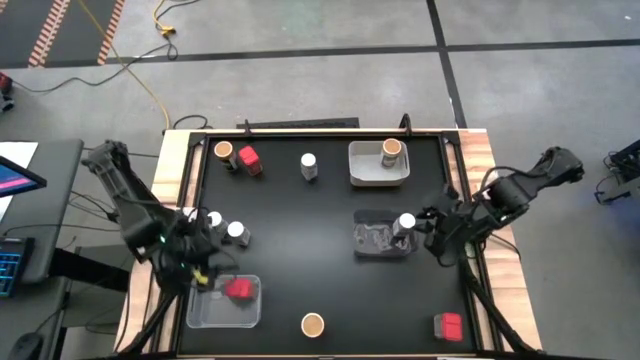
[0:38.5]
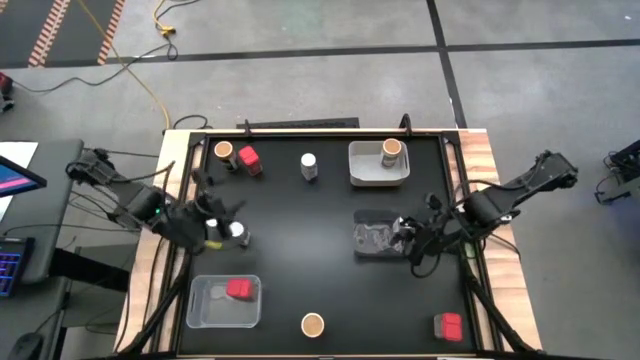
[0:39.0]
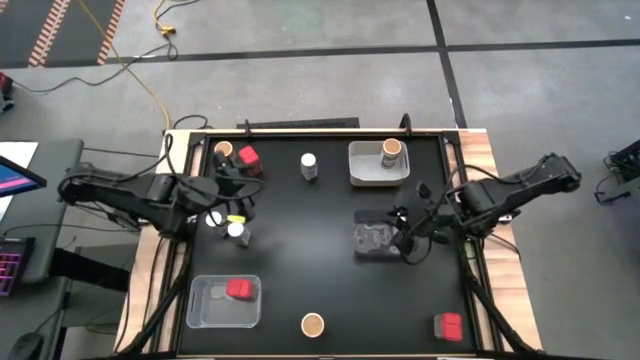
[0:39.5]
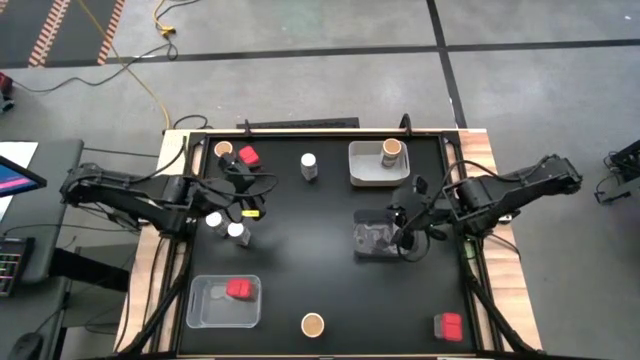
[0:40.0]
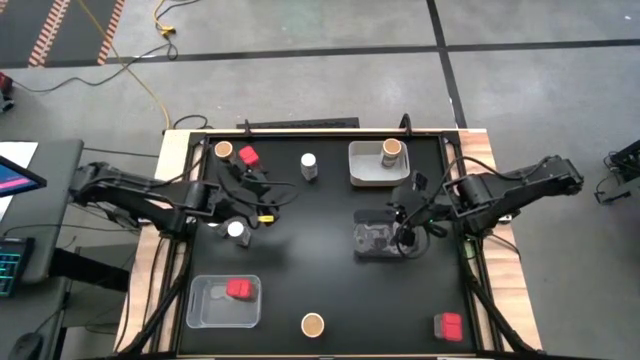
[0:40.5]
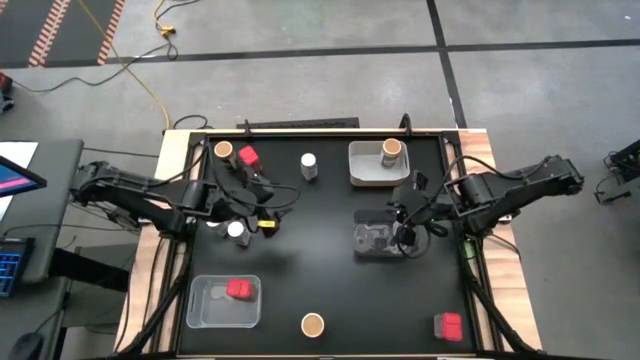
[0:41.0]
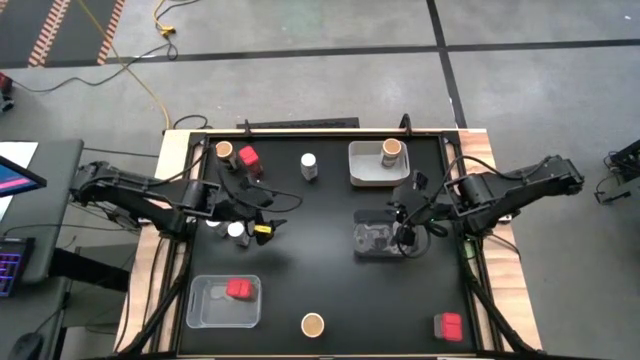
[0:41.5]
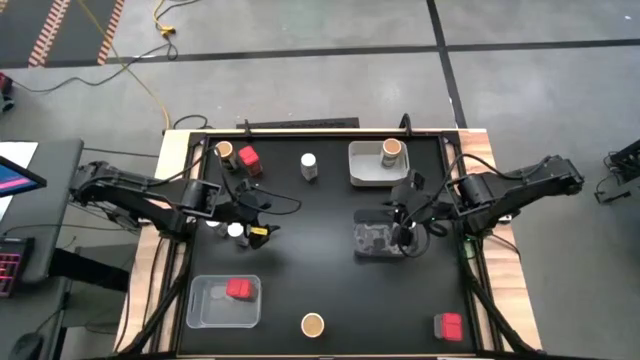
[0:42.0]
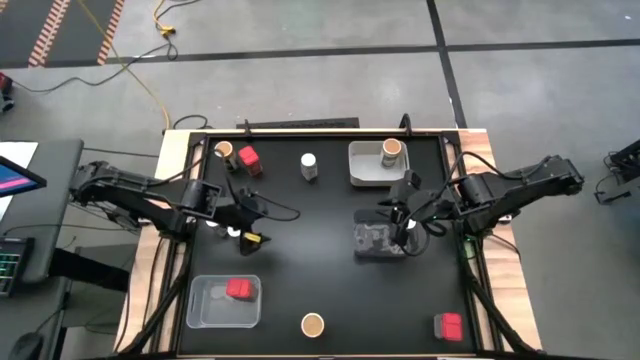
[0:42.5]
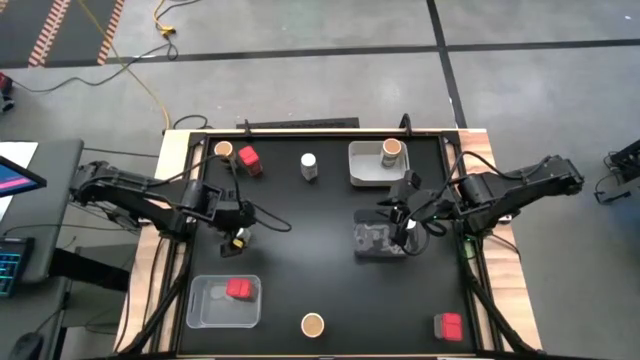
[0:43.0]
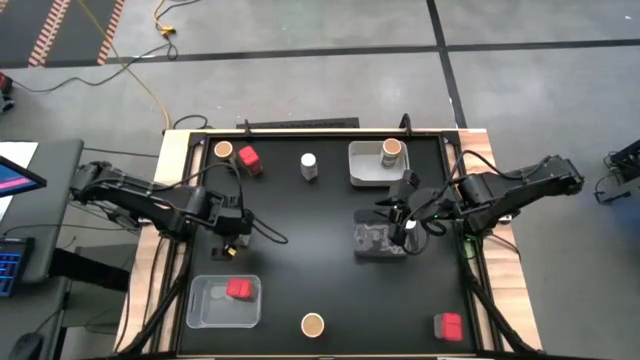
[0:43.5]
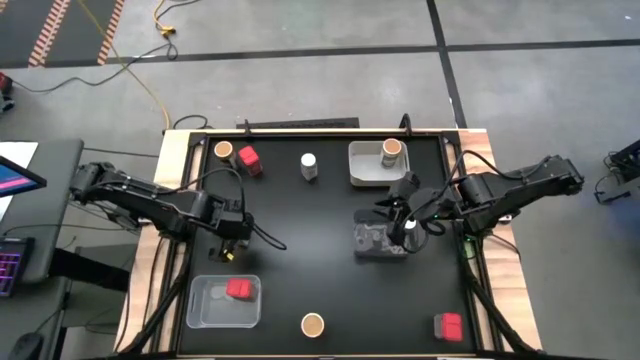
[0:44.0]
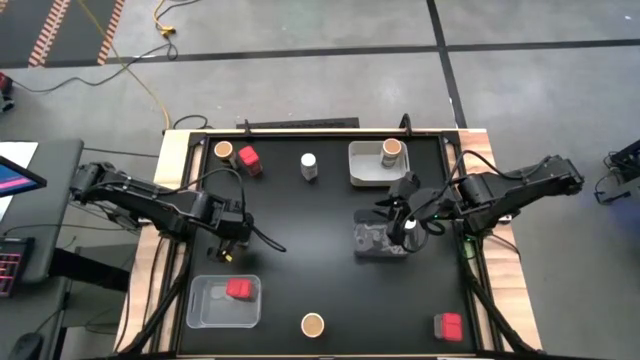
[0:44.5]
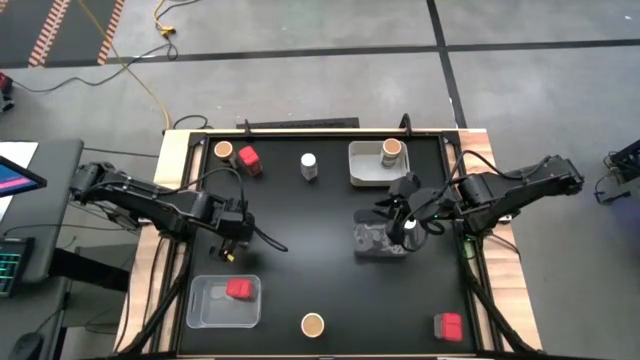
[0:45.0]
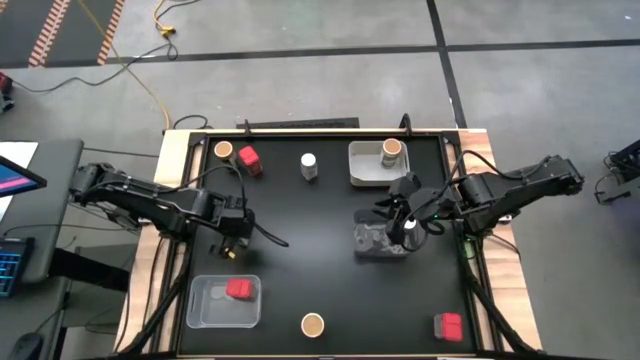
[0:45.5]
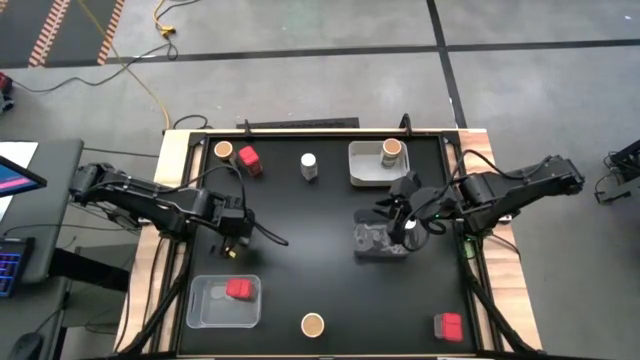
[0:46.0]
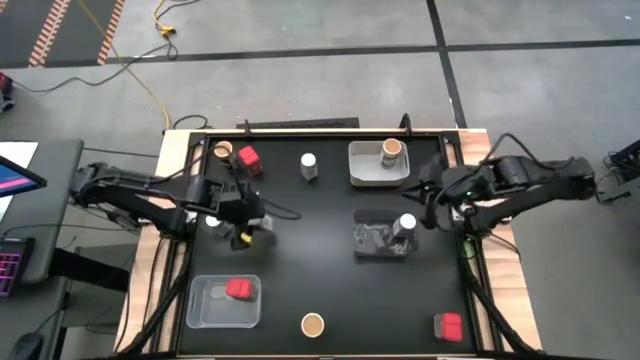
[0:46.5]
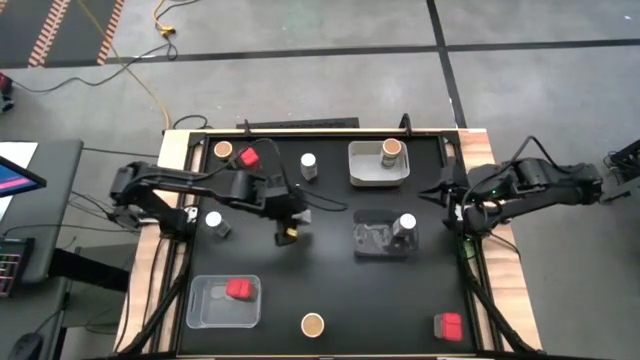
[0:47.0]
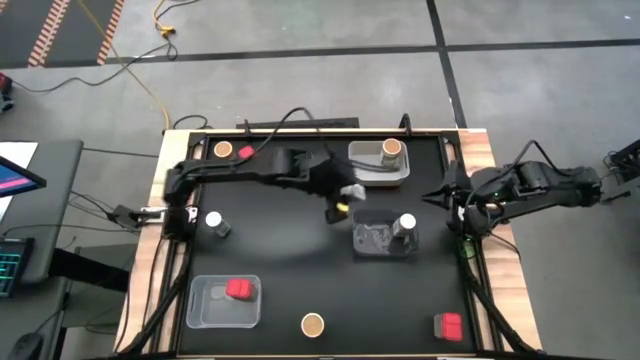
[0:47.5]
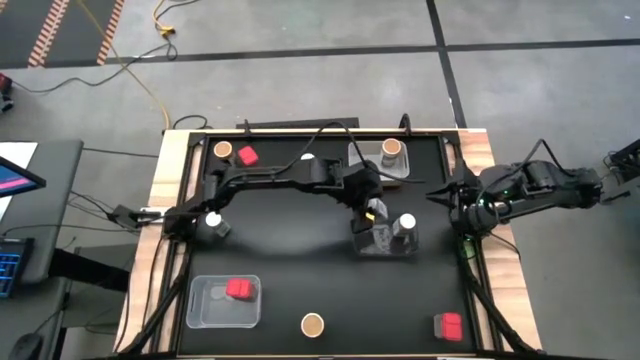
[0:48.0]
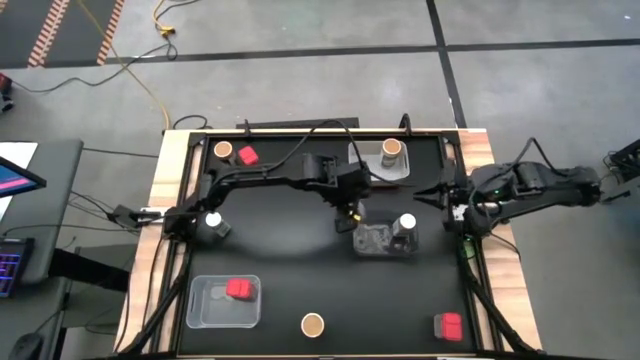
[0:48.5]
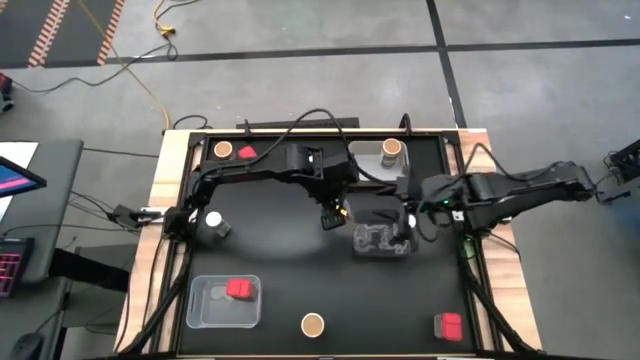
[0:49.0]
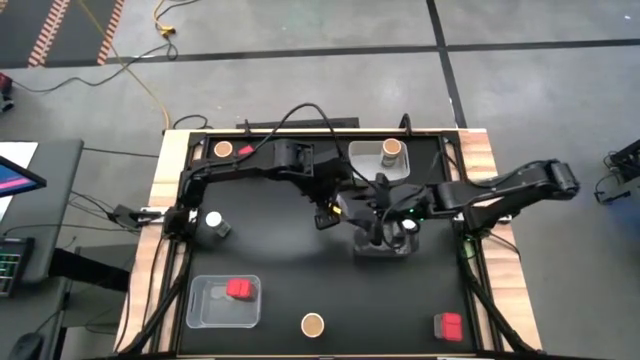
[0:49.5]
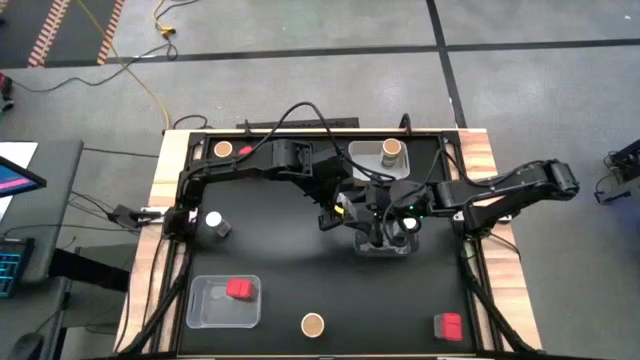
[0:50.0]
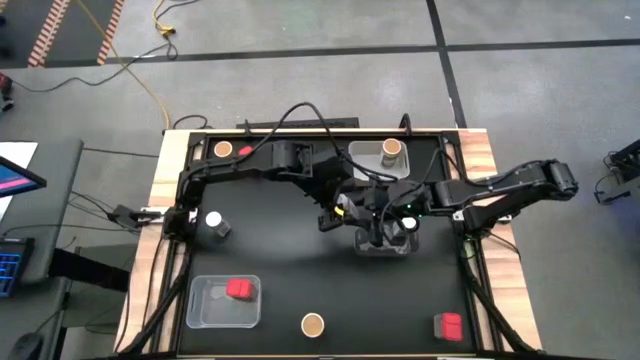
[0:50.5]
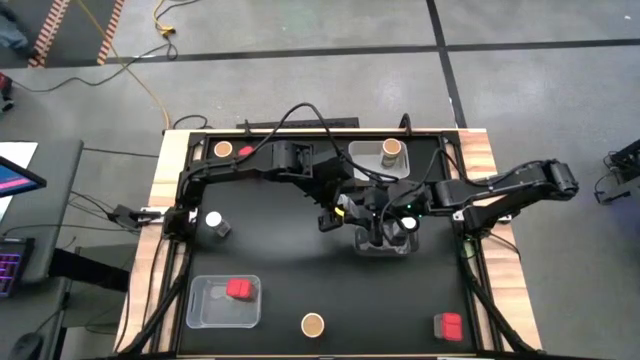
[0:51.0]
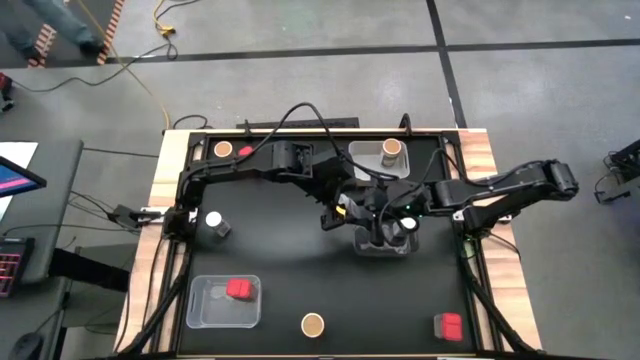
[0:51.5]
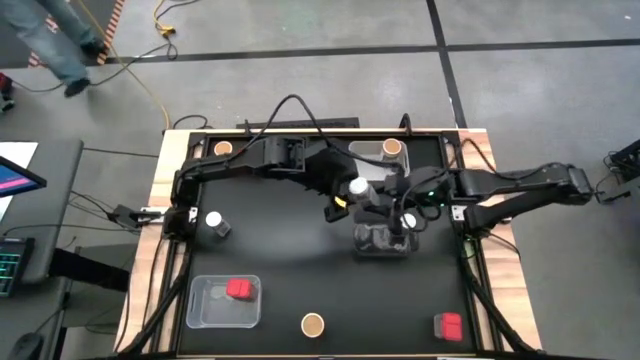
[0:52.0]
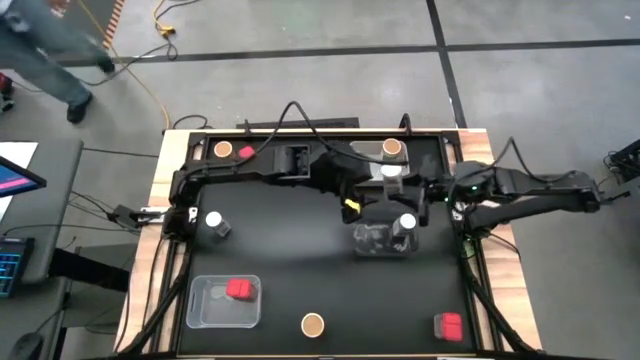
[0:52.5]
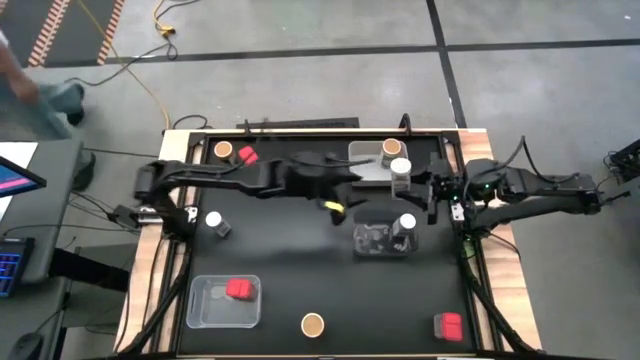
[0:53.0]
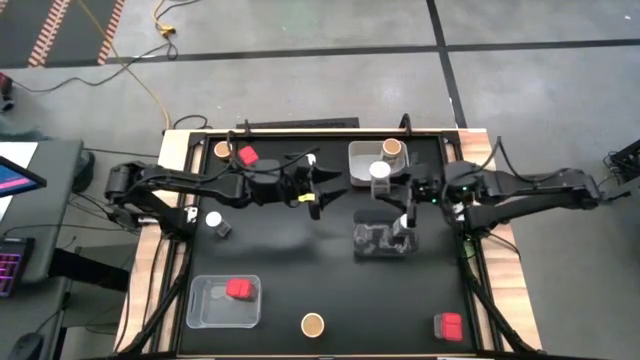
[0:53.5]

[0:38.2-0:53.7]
Task: Sort spices by type
Put the center left white spice bottle in the black bin

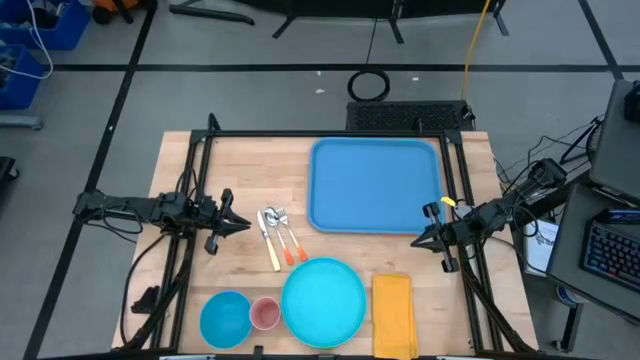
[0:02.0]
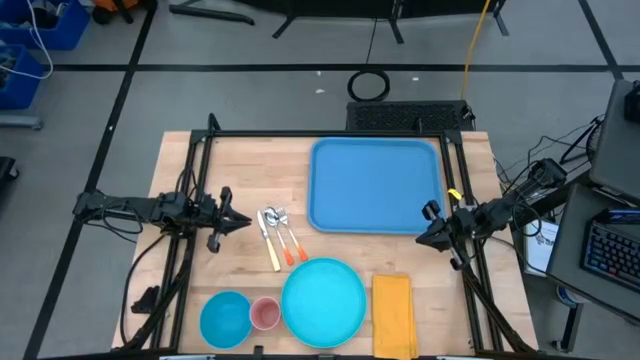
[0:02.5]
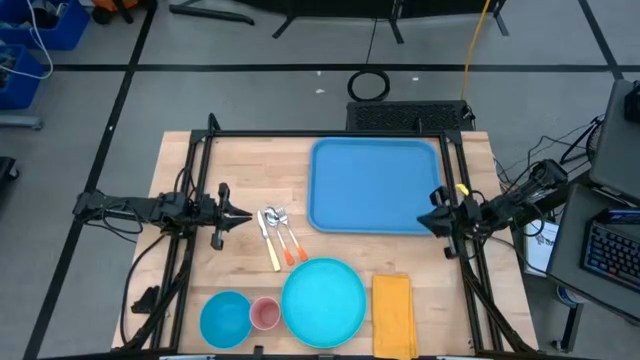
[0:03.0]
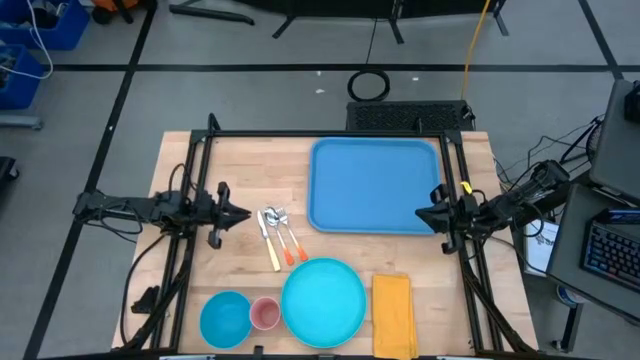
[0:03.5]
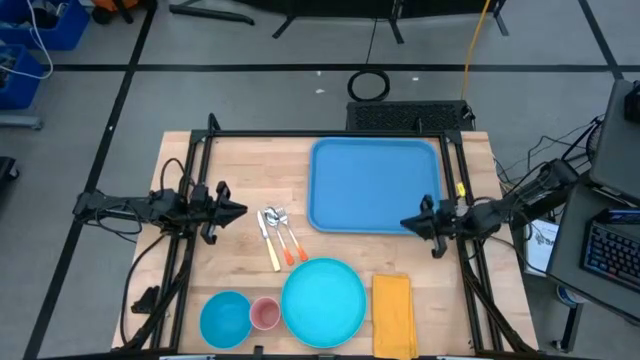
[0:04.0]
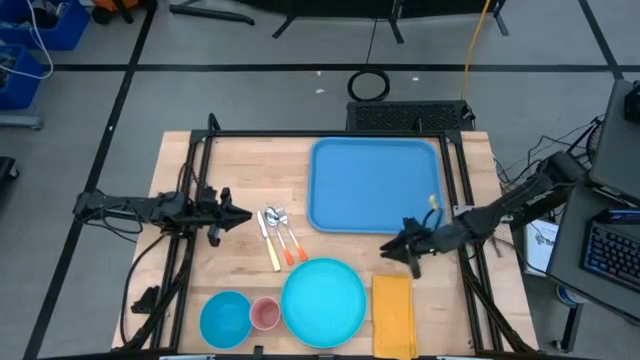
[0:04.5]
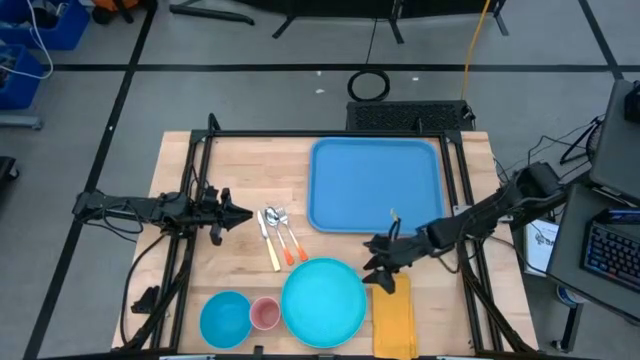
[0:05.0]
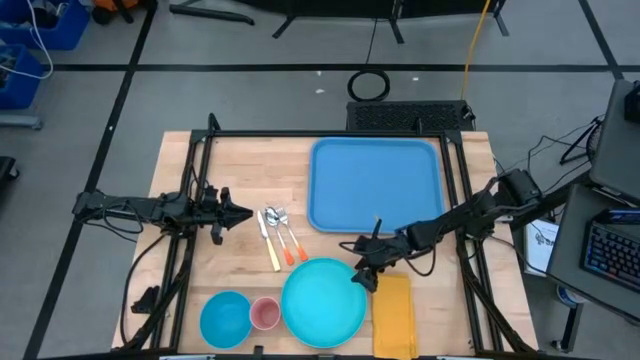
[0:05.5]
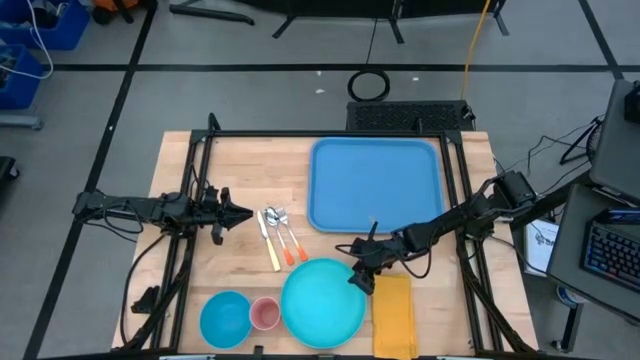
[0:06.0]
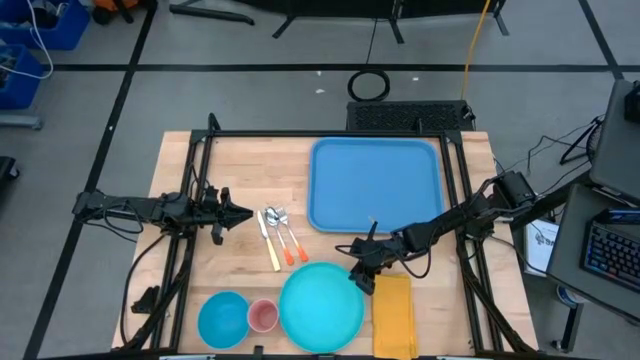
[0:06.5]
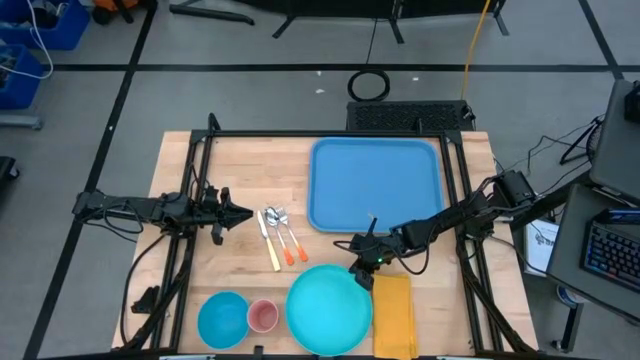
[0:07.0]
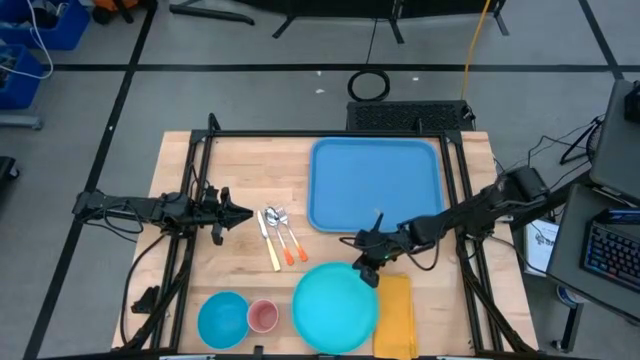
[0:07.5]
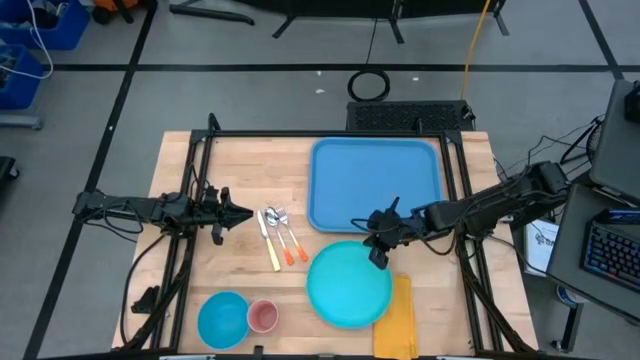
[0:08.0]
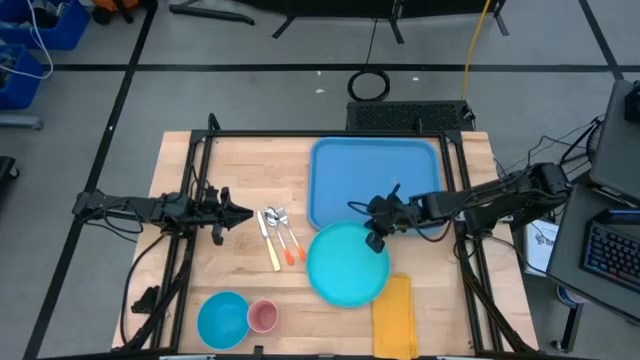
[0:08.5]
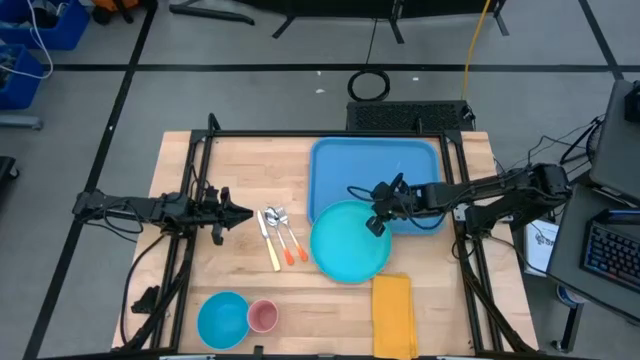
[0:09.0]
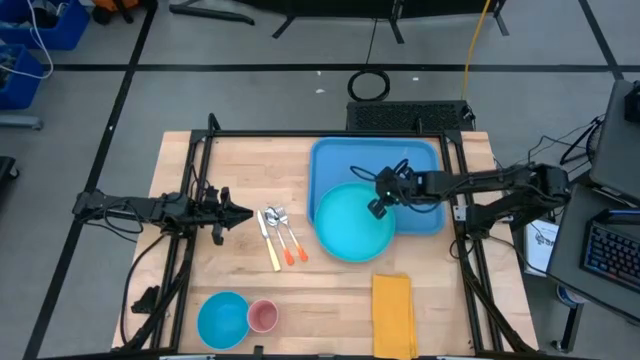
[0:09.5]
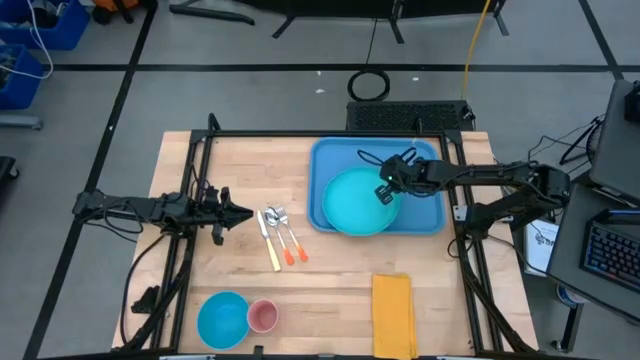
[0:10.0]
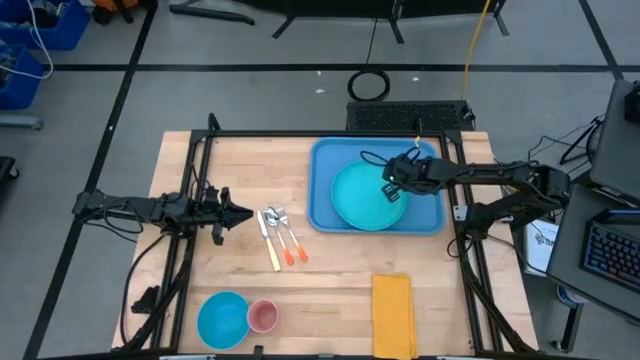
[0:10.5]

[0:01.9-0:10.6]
Task: Set up tray
Put the light blue plate onto the blue tray
